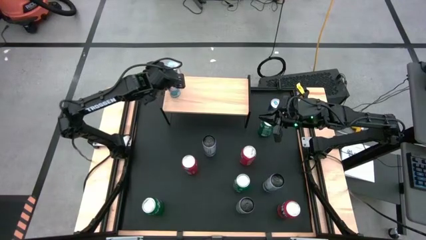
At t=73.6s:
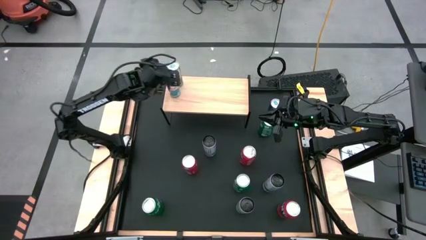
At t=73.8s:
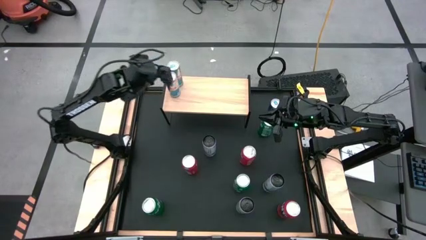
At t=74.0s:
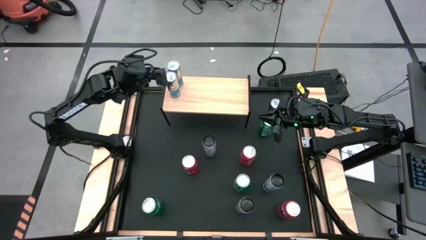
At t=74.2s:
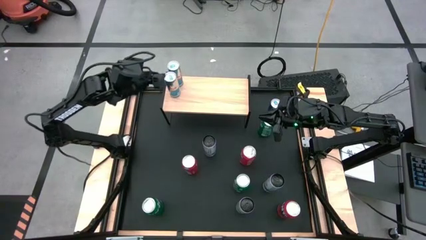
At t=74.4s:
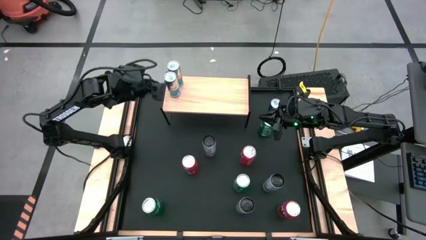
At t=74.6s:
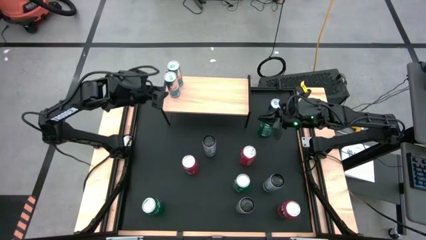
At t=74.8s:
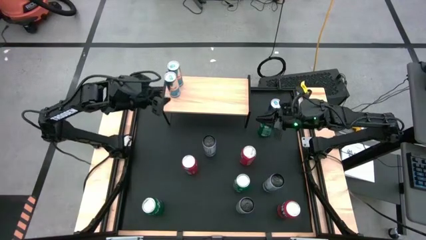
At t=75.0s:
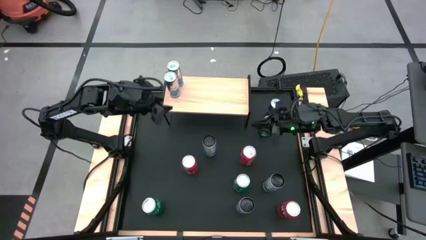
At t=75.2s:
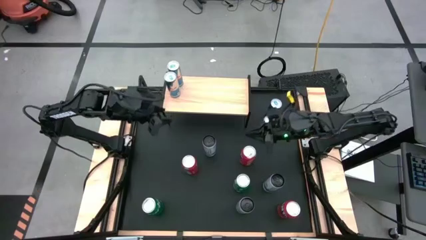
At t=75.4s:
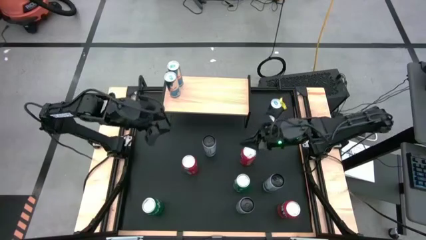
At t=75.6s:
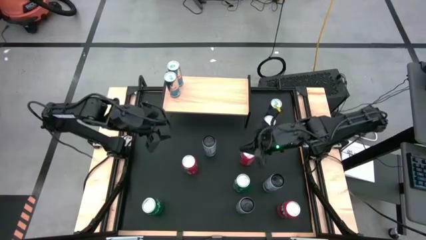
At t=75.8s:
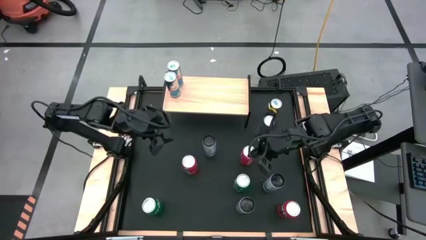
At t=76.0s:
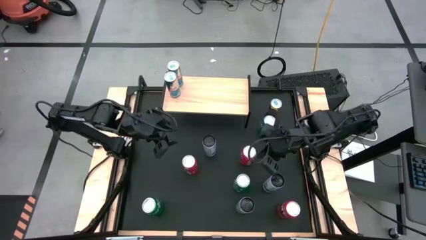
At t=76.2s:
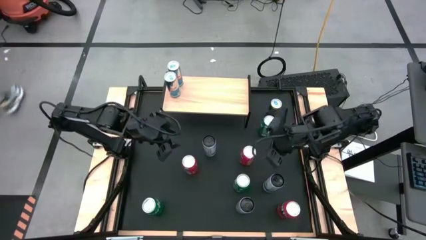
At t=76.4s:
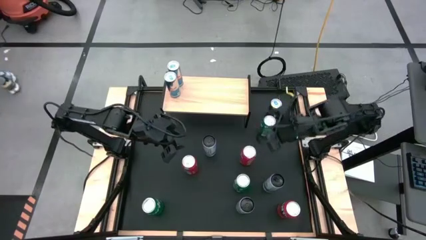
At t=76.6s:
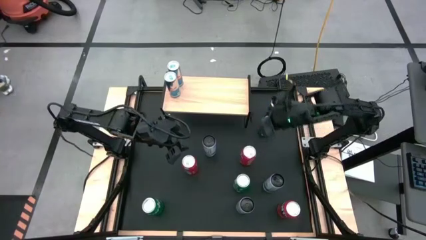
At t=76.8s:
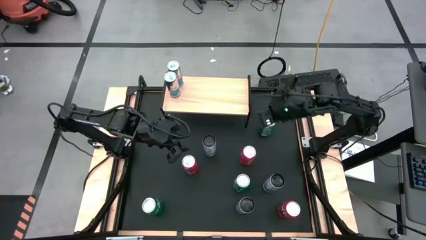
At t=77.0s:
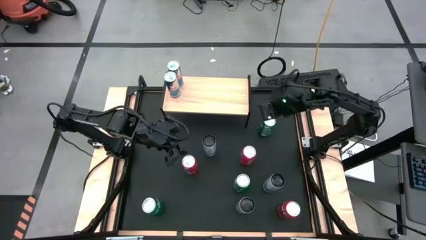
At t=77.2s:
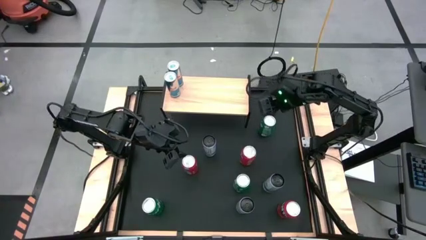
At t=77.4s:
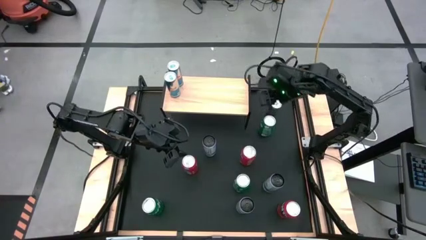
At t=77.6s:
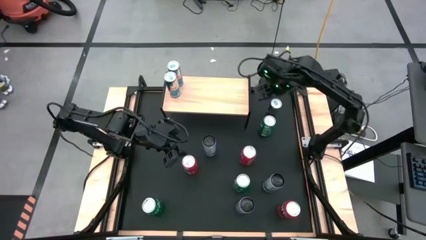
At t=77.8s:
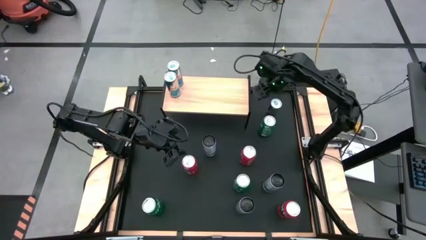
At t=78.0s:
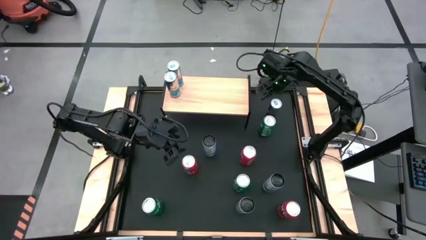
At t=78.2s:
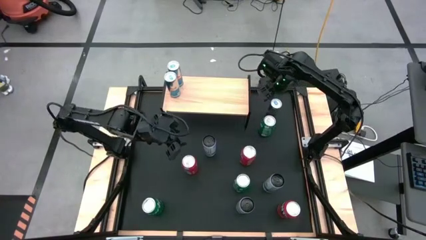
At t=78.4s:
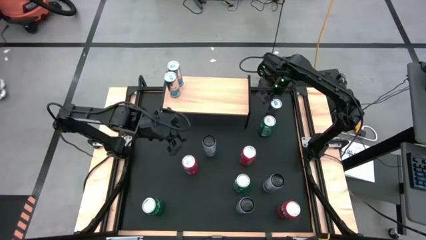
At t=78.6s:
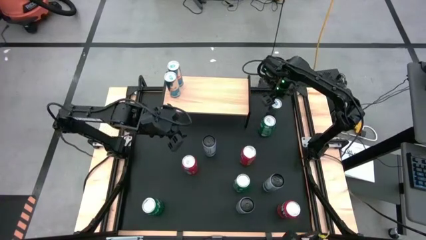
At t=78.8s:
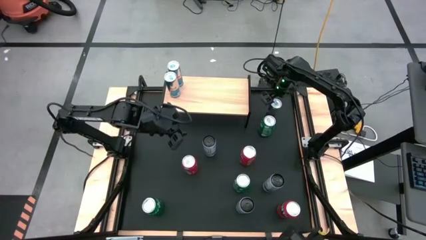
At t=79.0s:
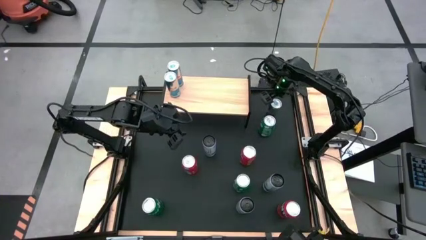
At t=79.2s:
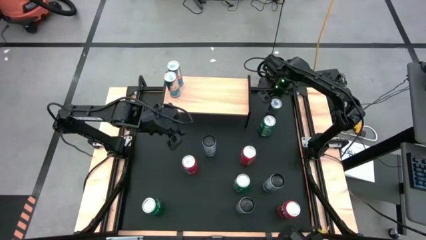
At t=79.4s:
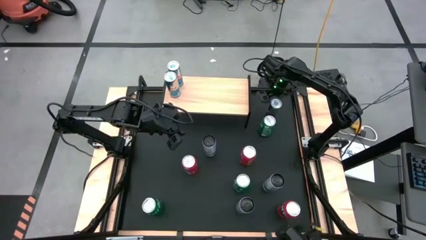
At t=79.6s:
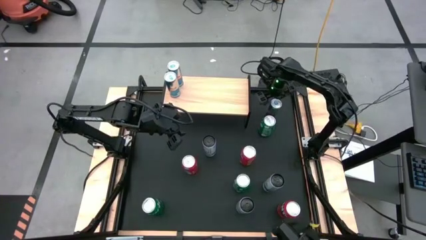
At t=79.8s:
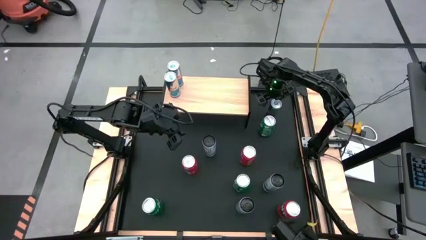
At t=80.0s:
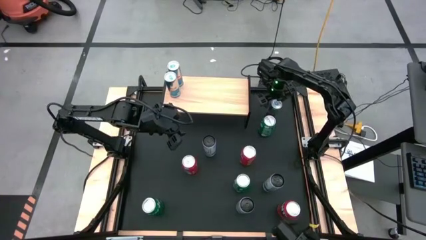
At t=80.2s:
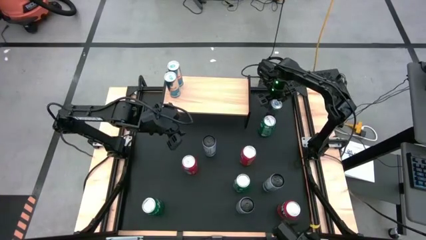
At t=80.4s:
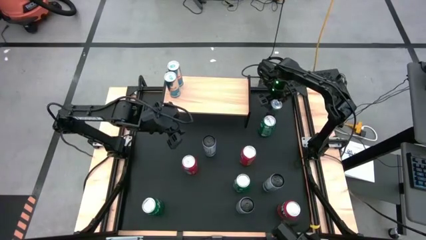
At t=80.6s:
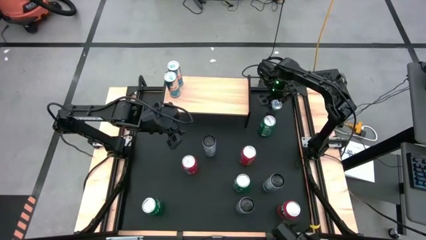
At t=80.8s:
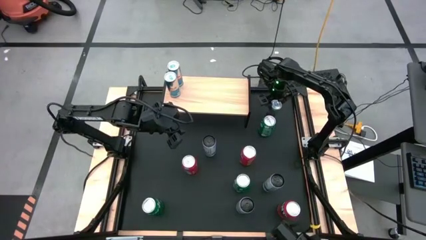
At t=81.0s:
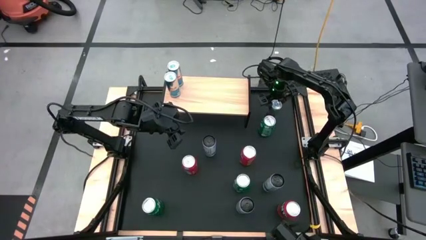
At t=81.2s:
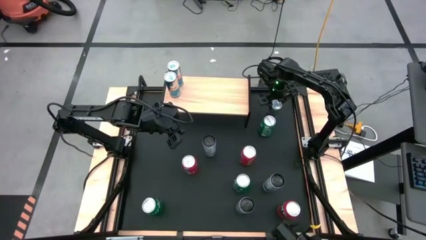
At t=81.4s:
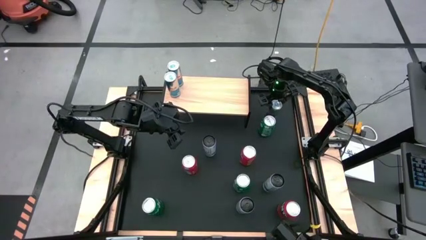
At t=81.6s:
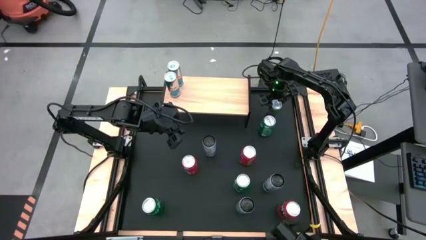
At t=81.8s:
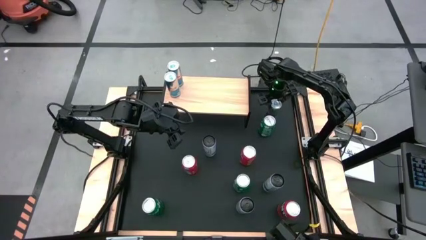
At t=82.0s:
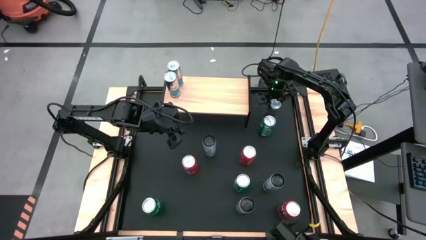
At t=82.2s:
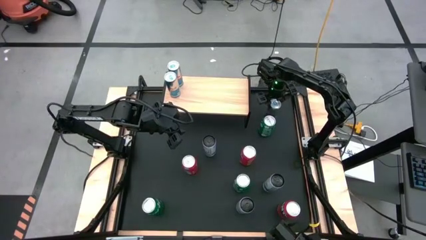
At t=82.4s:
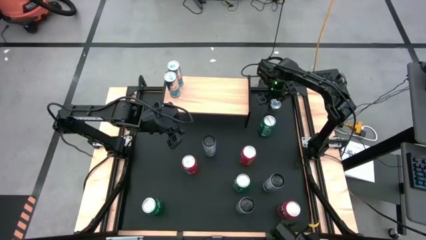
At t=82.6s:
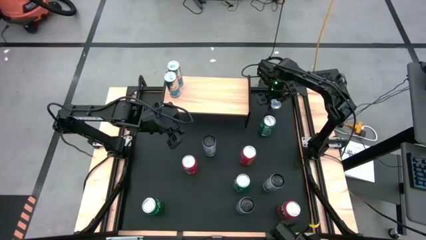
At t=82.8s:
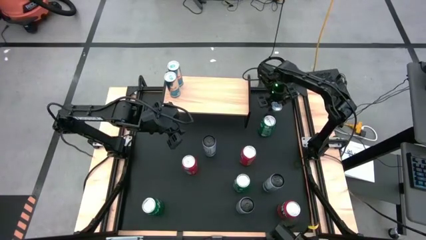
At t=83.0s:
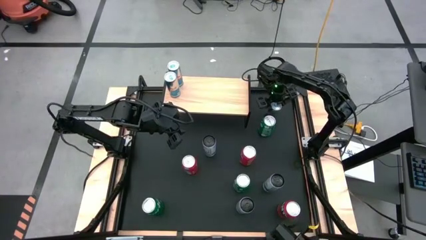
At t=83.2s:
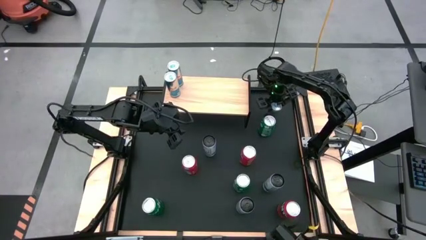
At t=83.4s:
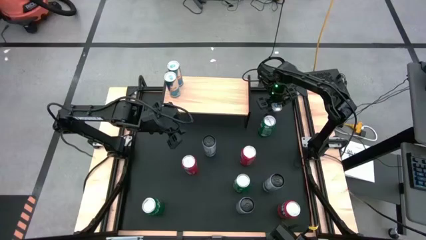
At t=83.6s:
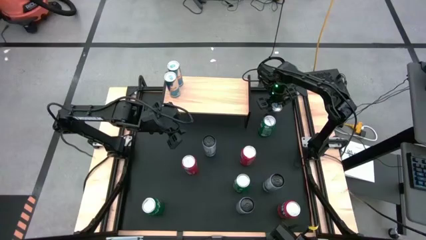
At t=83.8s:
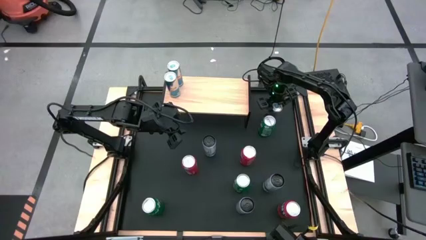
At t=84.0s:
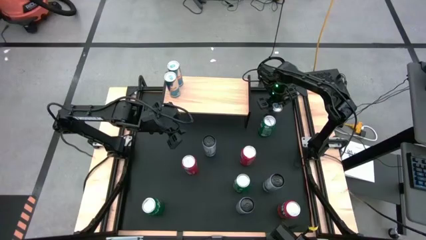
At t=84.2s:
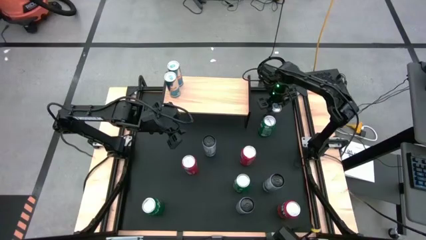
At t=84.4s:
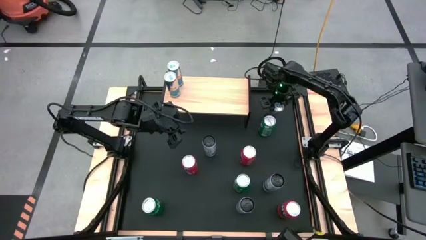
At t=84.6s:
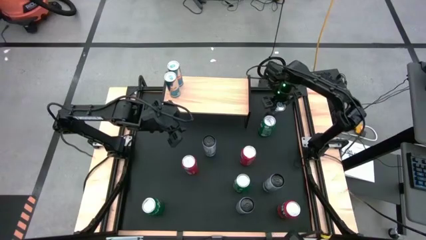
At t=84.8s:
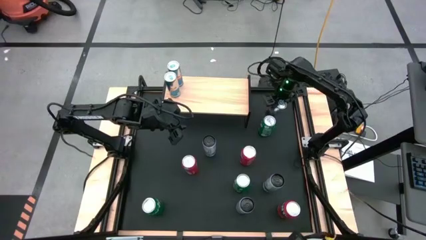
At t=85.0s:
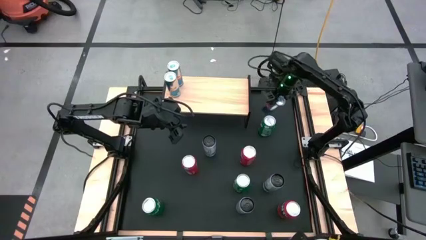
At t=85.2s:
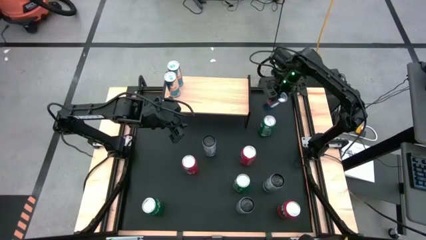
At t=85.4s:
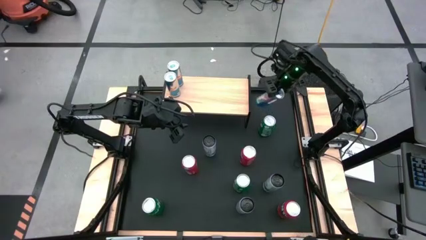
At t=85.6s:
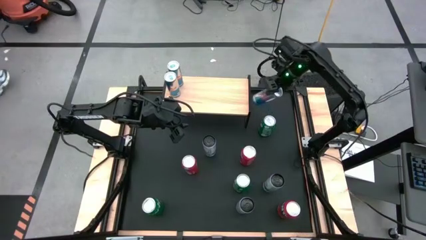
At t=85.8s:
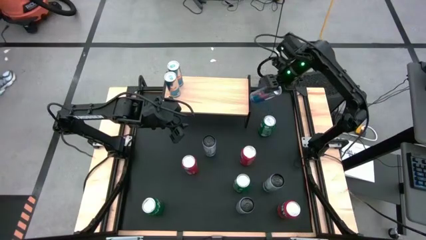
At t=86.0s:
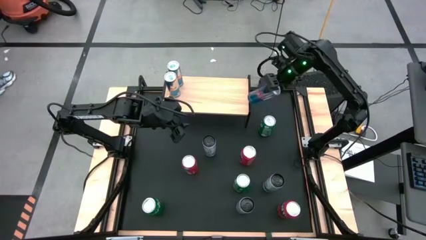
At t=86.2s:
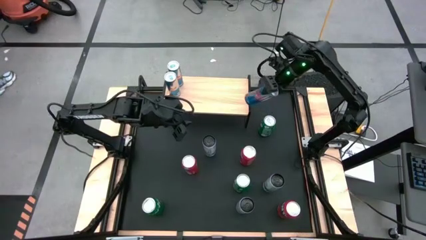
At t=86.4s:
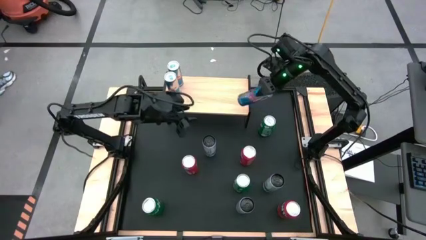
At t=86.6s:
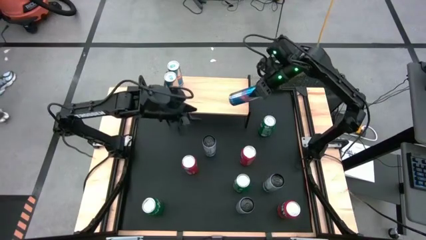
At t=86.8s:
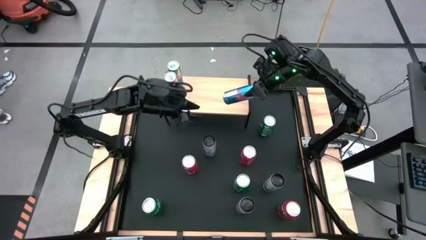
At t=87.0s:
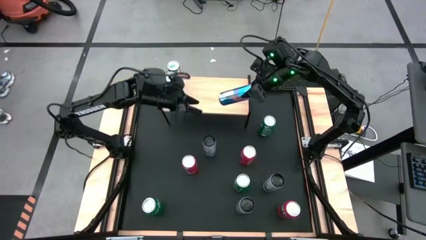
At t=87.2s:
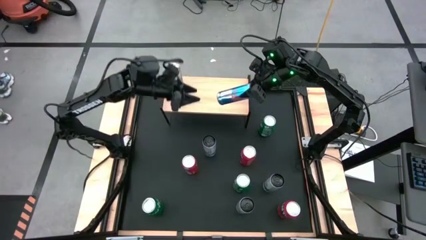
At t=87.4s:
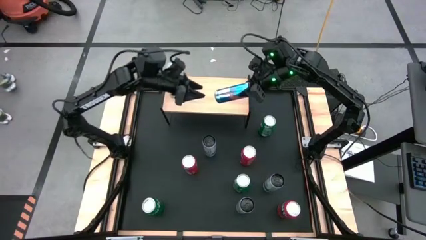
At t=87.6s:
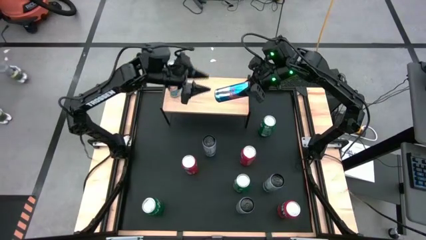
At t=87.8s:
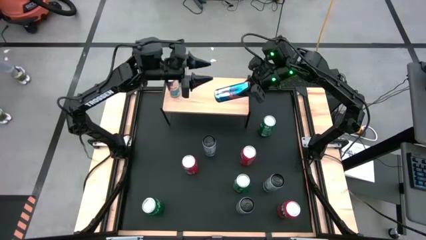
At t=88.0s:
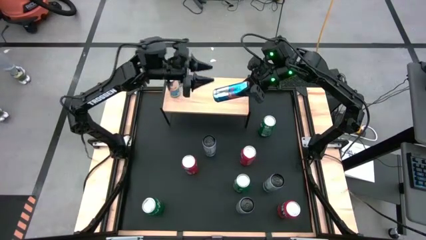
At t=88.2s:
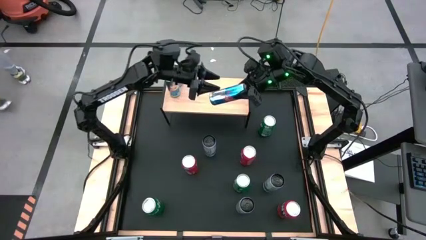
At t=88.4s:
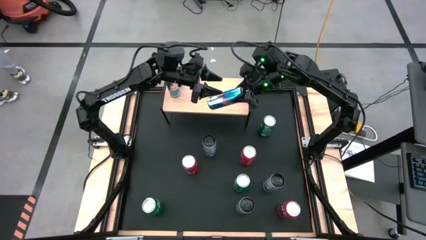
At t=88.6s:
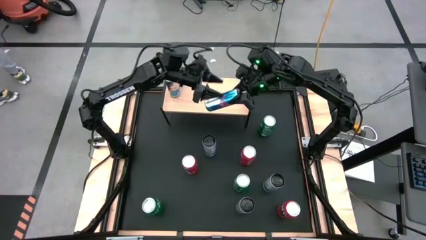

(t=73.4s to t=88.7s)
Task: Place canned beverage on shelf
Put the blue soda can on the shelf

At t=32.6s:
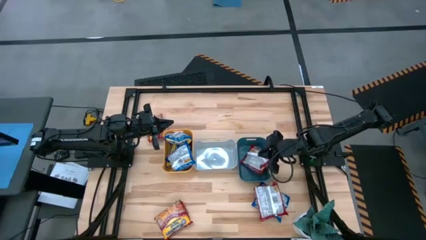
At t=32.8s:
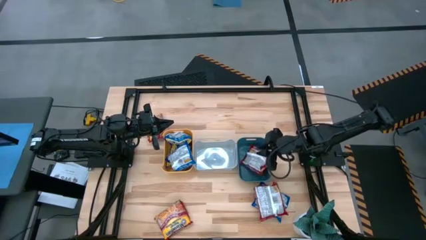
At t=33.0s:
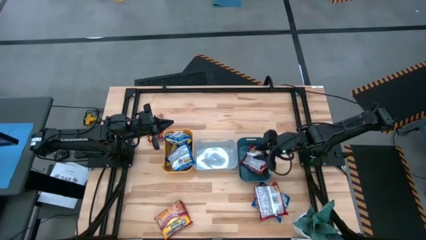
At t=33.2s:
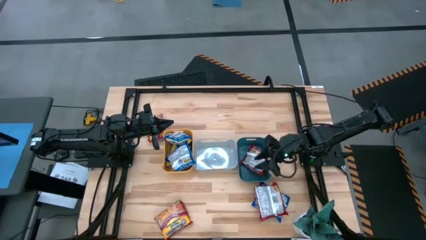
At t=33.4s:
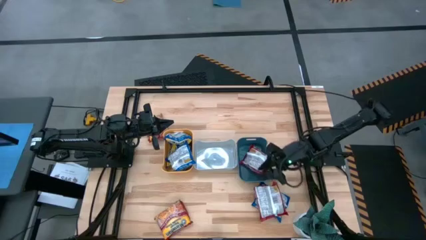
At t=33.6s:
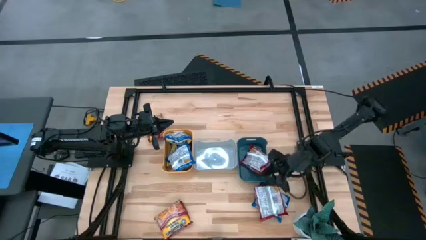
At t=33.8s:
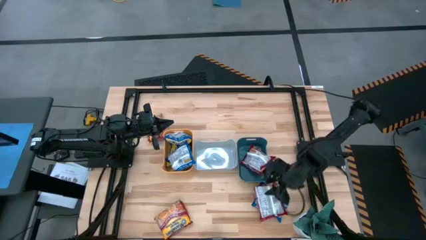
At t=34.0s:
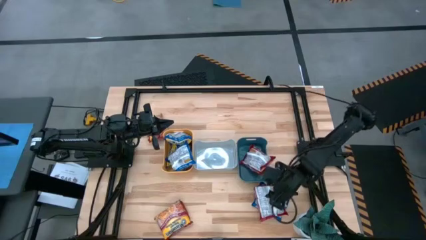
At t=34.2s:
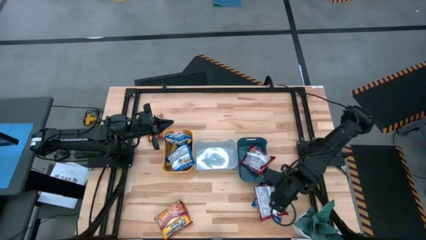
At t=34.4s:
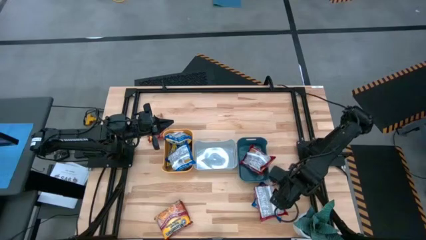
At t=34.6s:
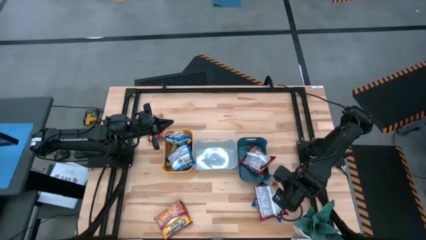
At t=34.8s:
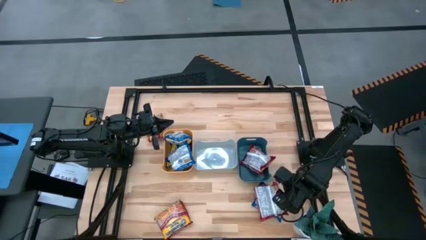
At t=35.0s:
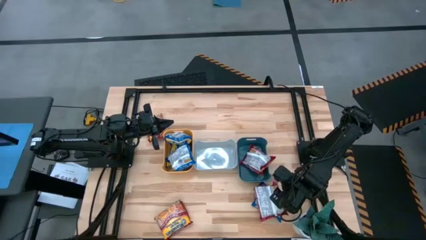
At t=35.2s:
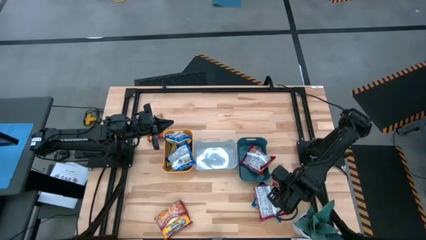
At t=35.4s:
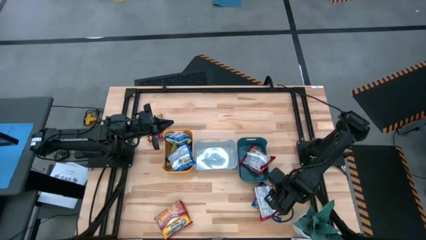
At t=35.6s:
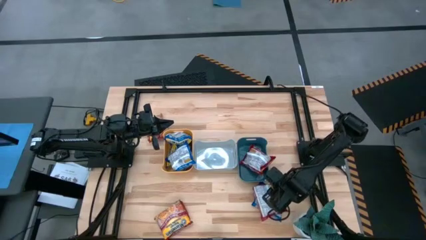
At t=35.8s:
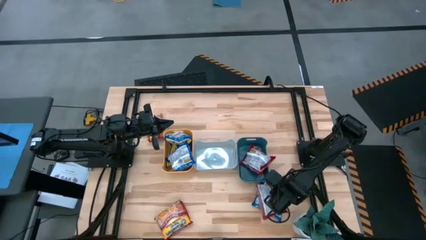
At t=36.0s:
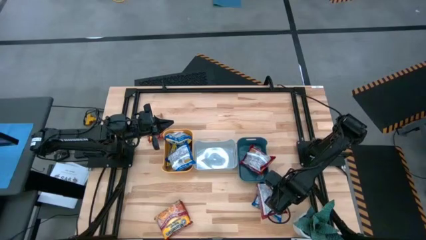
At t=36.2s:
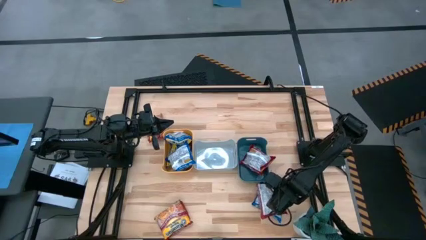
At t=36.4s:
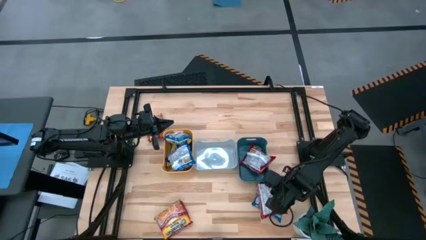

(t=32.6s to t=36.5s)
Task: Sort Maruchan noodles
Put the bottom right red noodle pack into the blue bin
